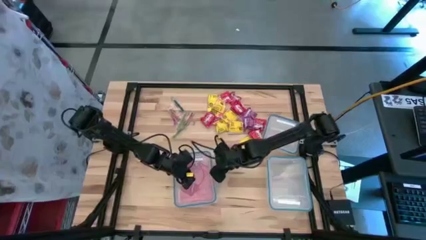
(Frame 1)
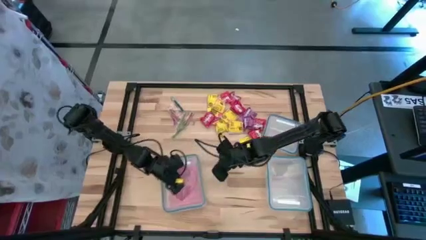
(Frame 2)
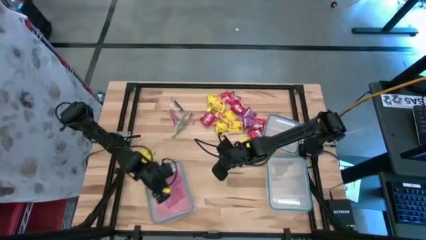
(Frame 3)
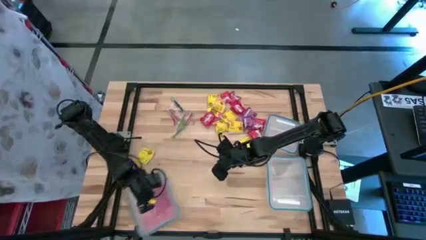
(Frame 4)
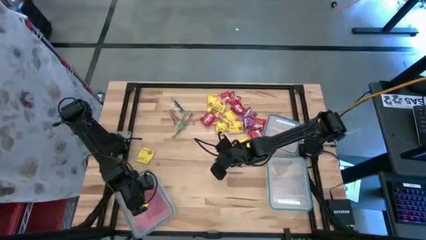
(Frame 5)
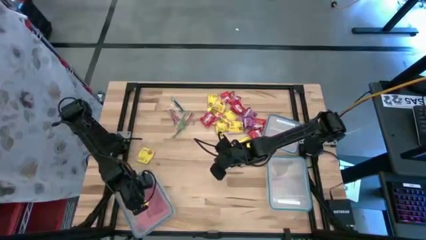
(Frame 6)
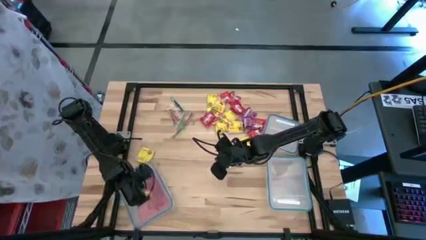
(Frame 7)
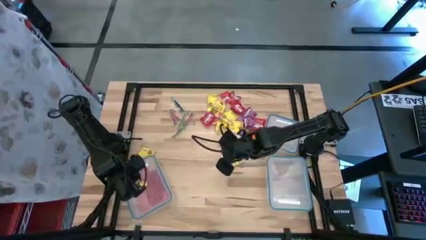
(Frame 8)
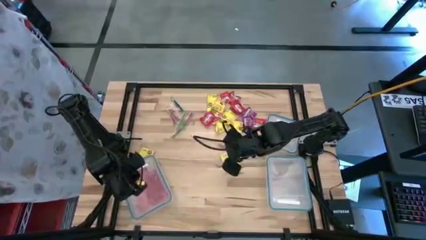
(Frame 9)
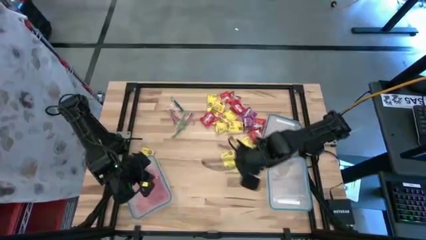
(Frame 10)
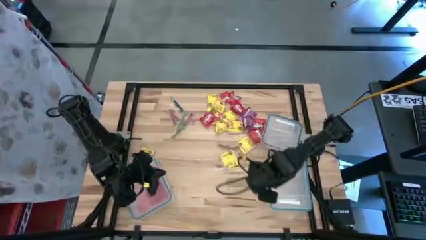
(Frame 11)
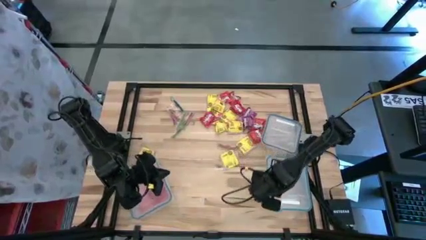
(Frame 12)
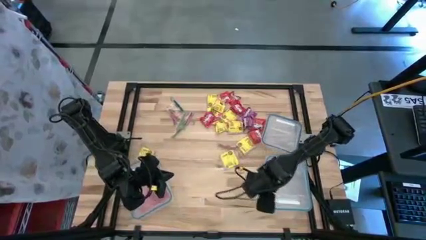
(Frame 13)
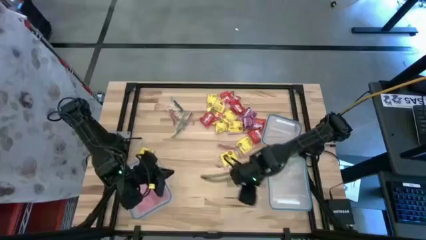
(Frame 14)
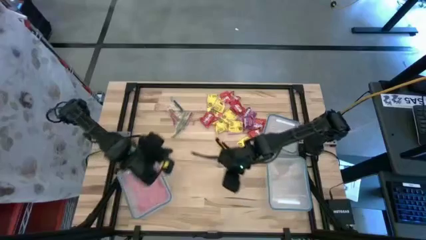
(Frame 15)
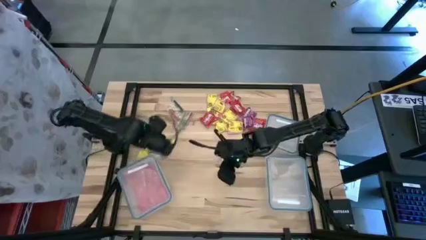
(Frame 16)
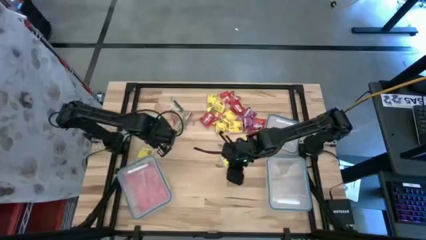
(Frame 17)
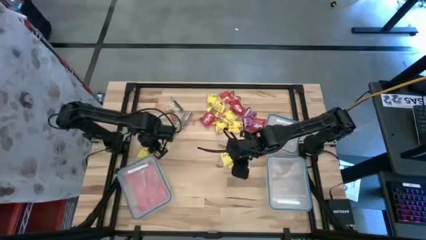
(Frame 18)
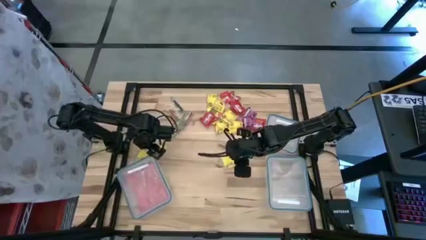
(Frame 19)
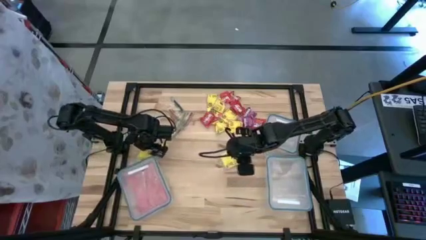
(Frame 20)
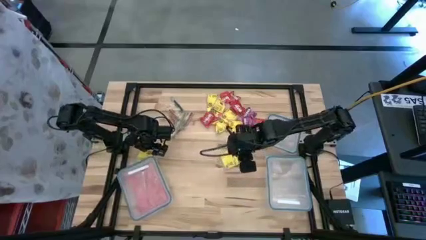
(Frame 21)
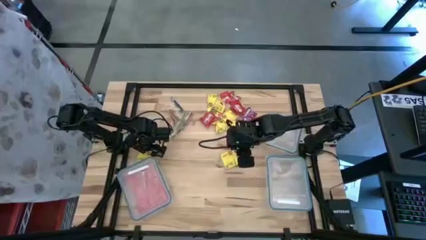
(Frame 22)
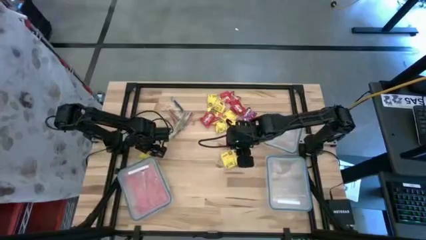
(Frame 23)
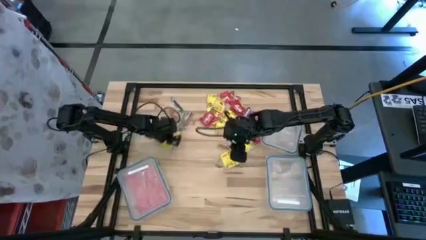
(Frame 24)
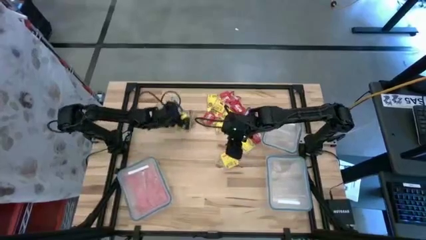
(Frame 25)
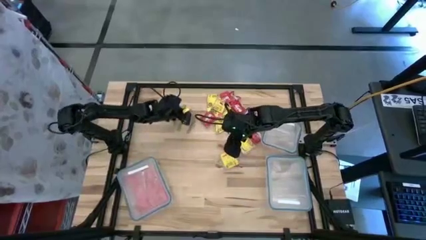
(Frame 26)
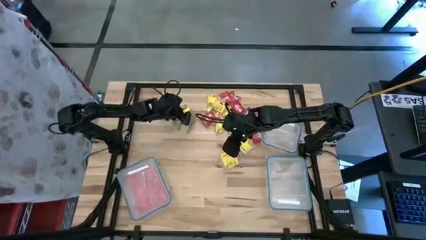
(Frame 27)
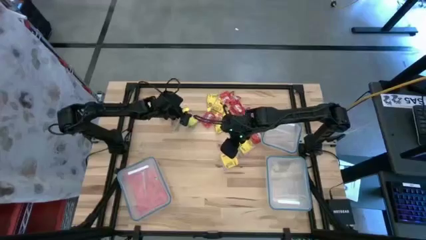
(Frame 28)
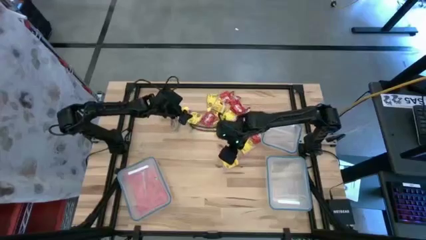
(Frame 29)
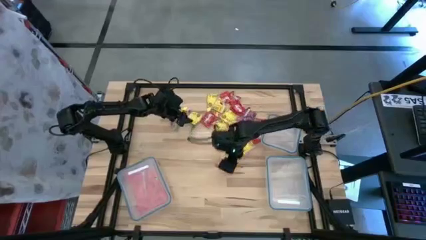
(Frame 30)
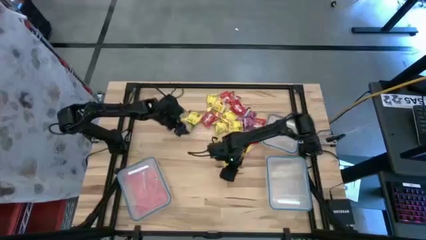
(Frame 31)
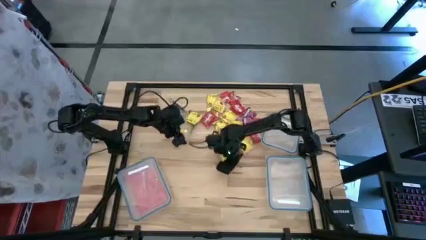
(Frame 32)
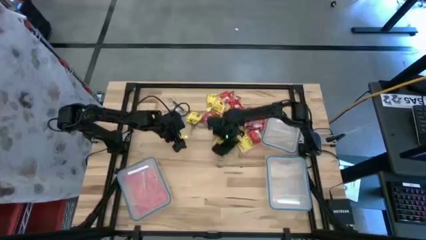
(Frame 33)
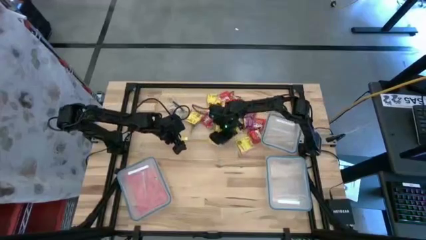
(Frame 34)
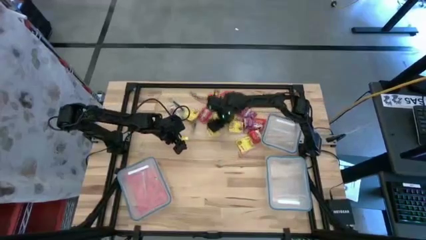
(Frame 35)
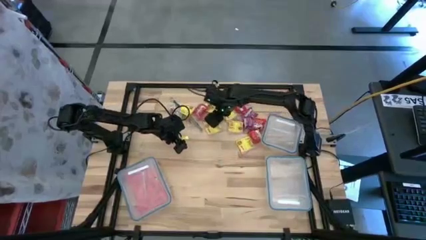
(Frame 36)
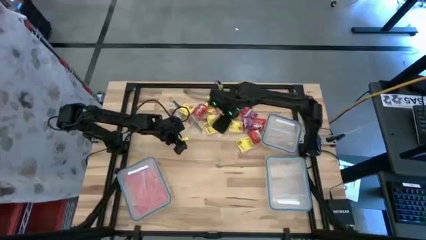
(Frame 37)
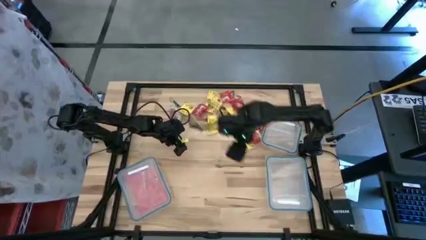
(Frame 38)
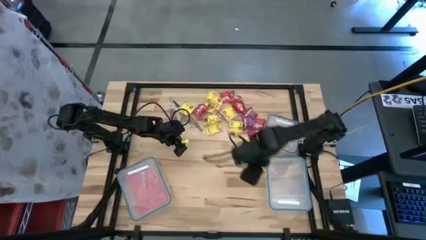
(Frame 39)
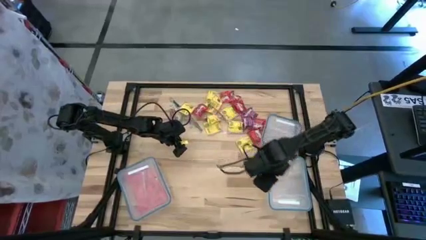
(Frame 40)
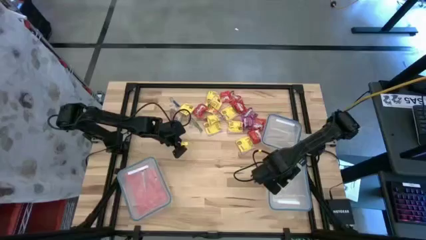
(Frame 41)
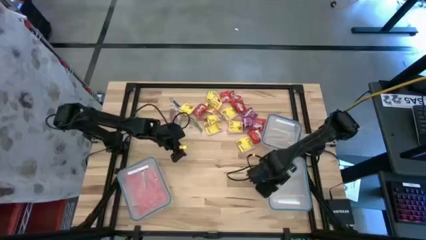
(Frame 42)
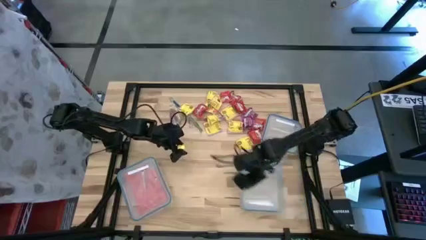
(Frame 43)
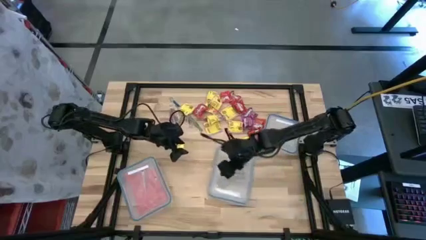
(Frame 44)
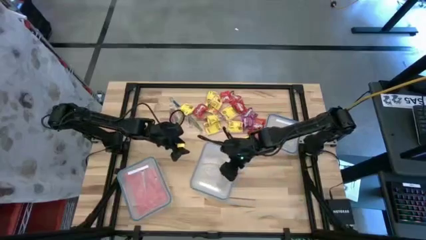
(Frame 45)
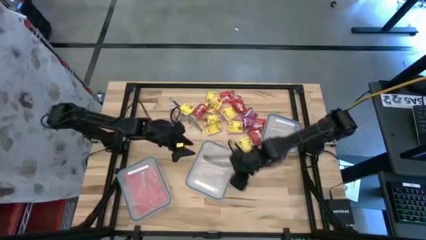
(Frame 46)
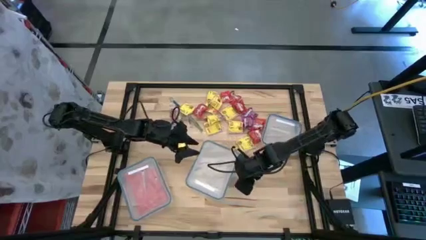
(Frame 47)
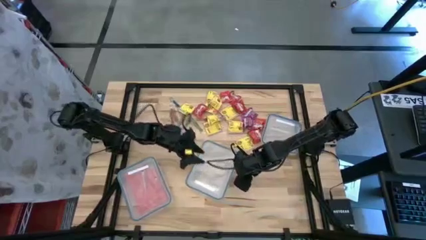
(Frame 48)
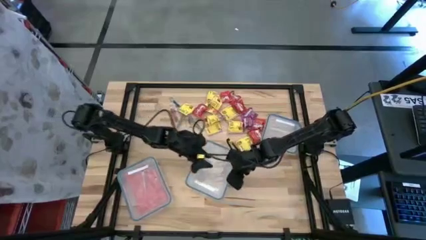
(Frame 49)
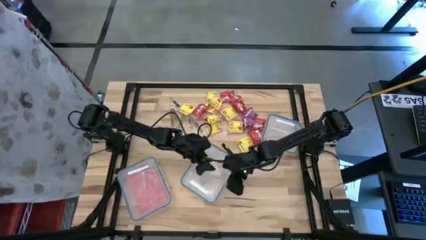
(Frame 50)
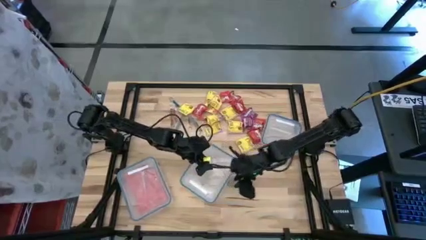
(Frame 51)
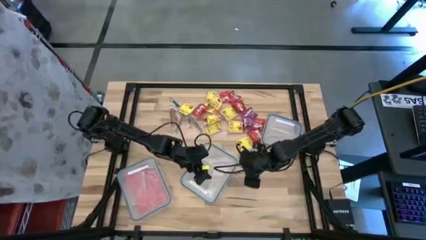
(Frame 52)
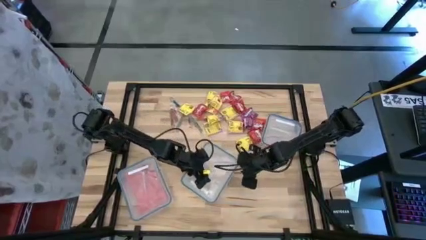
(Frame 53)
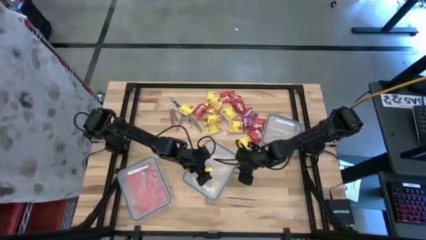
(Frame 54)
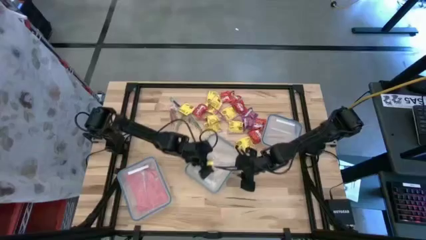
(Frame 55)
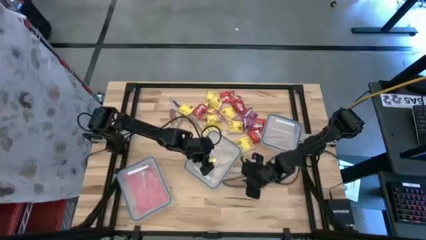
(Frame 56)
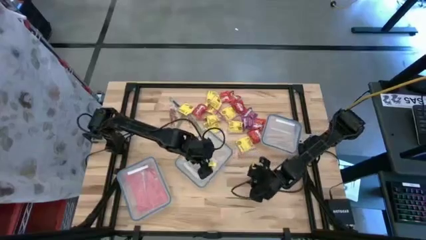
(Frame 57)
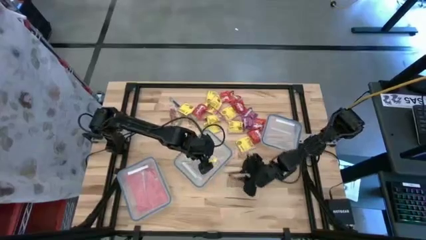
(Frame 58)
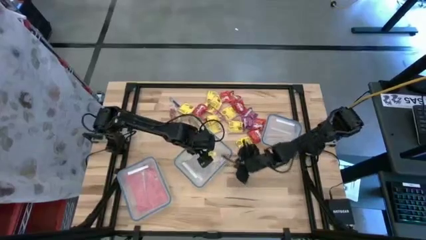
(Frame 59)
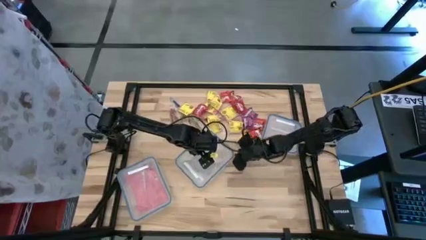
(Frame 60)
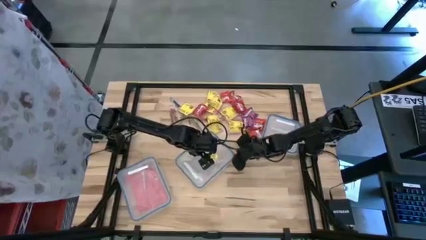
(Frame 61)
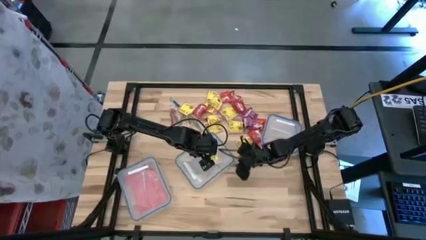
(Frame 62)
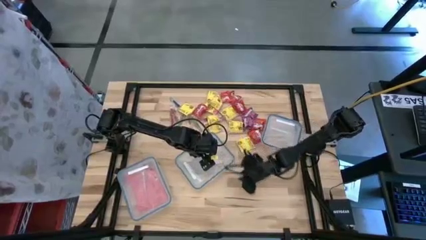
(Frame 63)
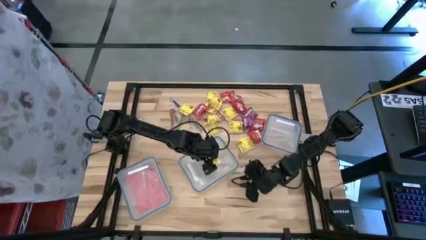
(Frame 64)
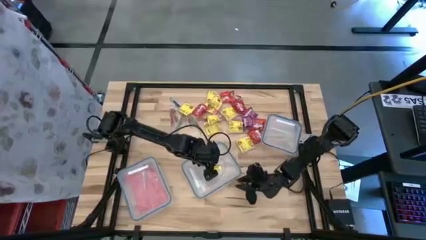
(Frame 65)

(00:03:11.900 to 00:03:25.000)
Task: Sort candy
Open the rectangular transparent bin

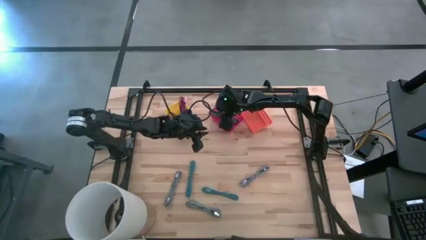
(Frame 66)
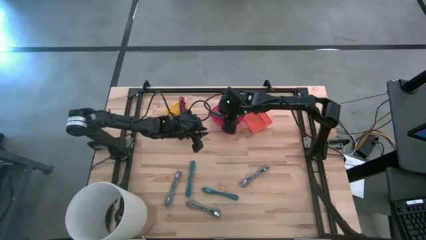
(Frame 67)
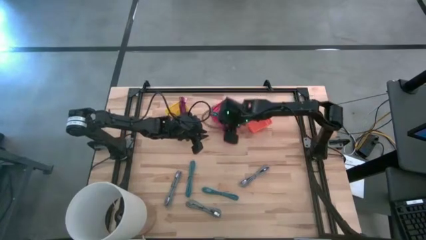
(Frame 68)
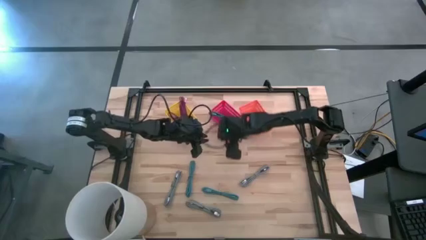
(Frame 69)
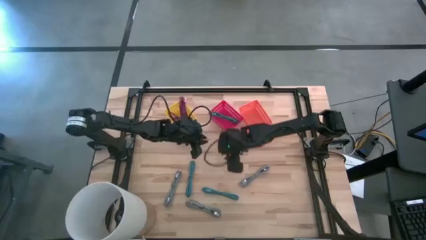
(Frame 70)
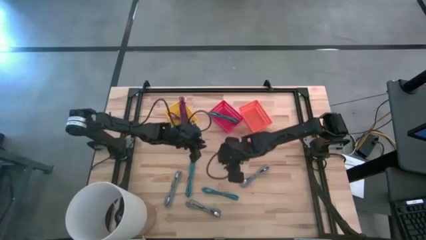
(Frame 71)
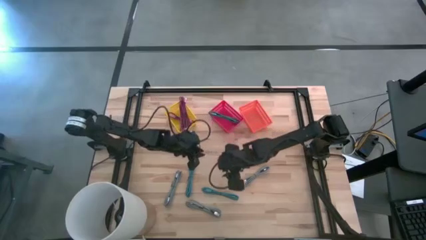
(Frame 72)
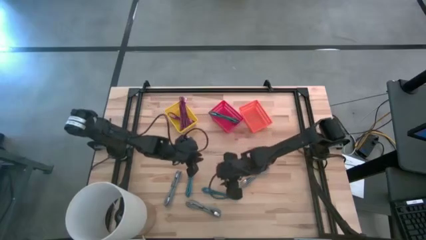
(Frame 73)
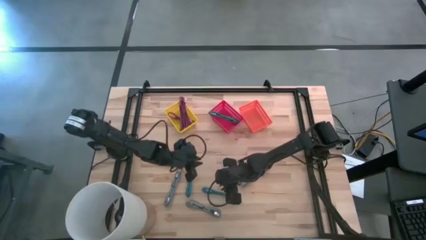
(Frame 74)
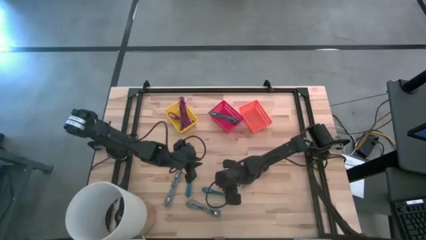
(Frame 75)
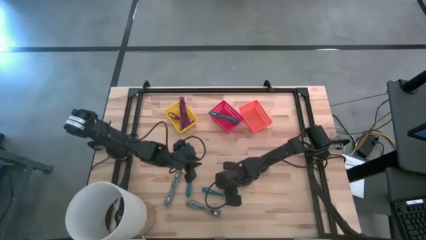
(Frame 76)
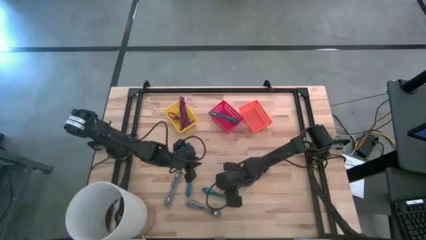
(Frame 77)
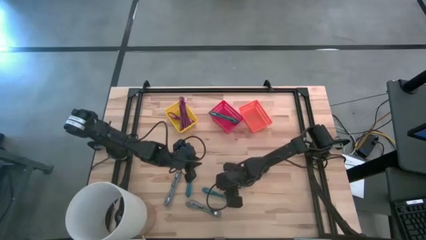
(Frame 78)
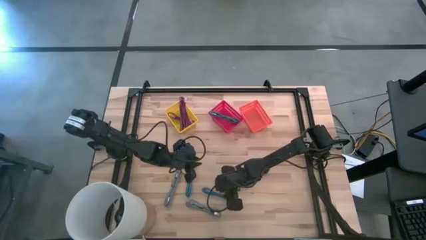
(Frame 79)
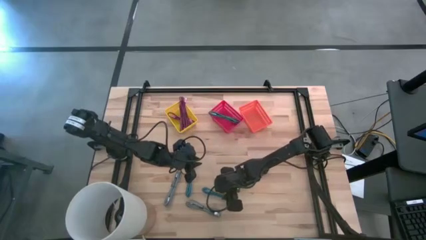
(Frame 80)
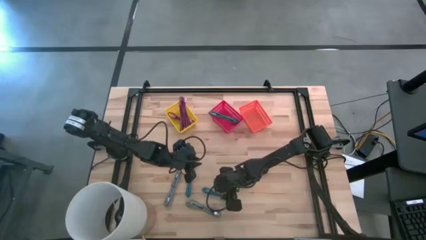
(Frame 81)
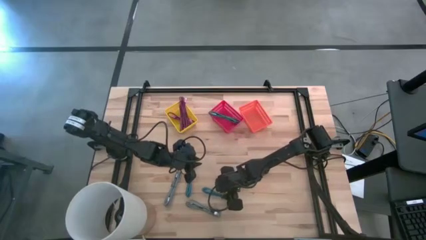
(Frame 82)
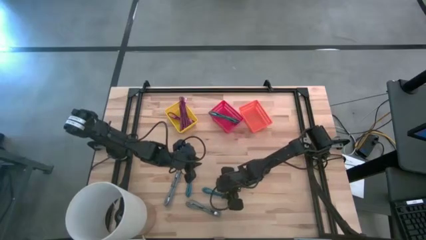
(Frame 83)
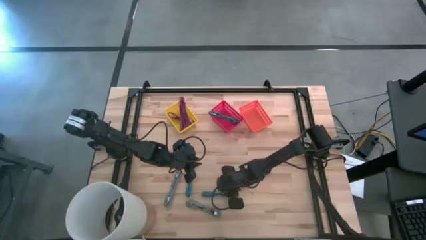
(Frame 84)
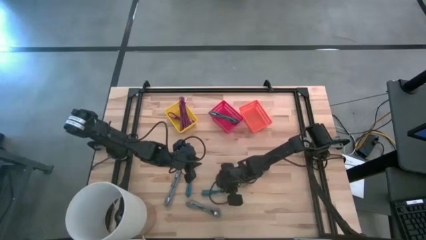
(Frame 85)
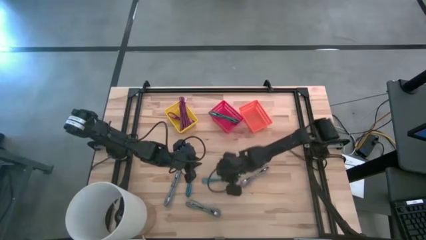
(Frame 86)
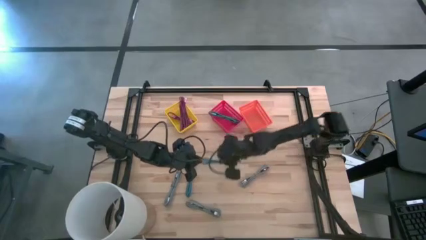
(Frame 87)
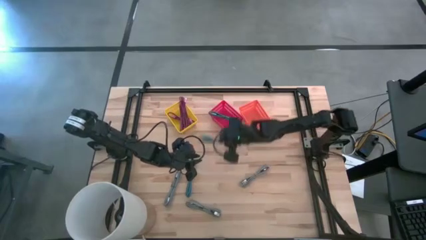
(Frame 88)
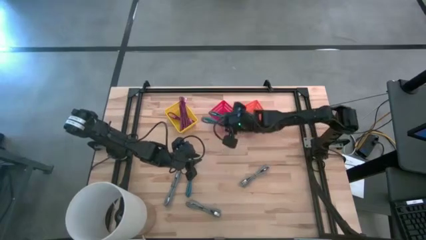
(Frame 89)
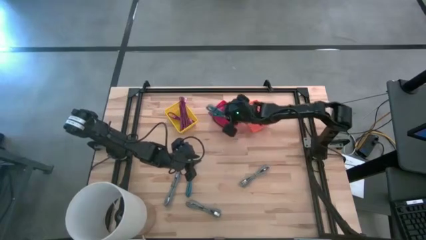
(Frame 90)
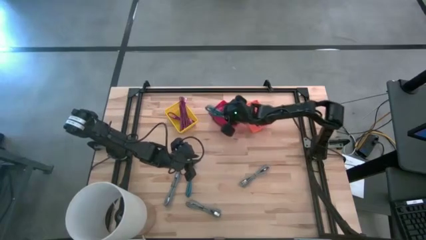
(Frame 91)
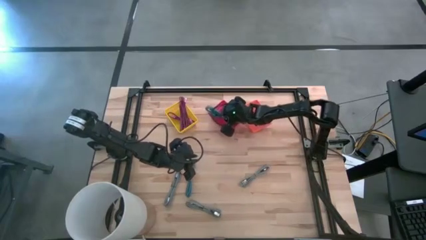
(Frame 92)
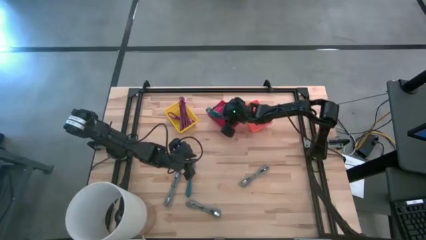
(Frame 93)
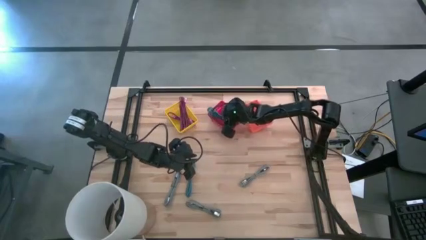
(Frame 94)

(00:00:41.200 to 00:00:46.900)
Task: Pick & Place USB Port
Put the right black blue USB cable into the red bin
